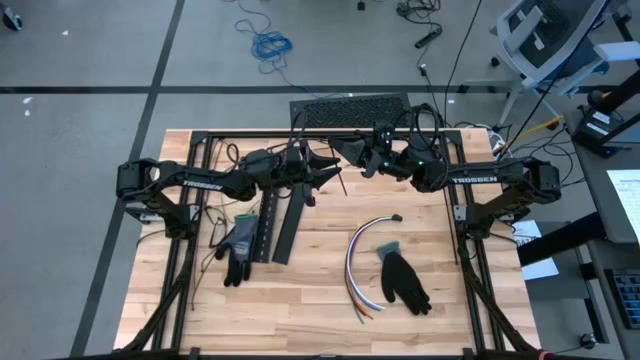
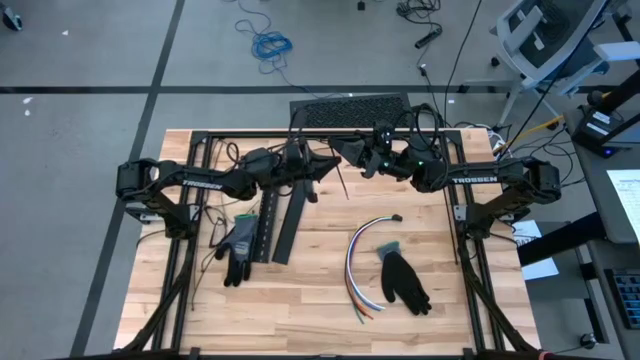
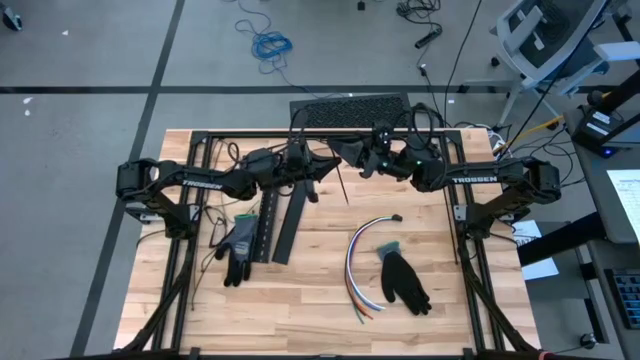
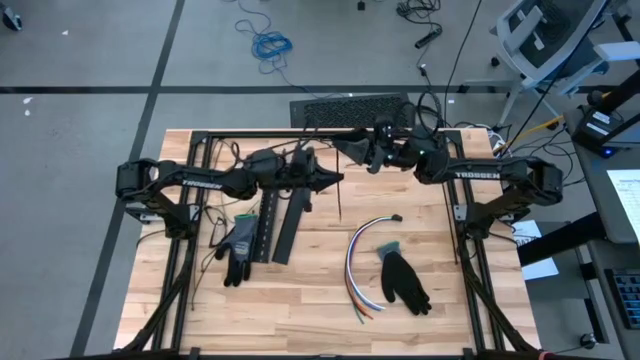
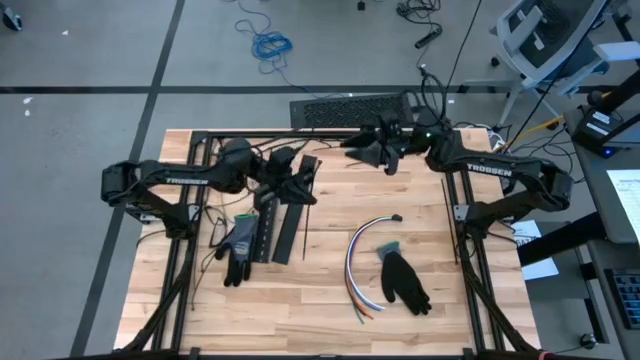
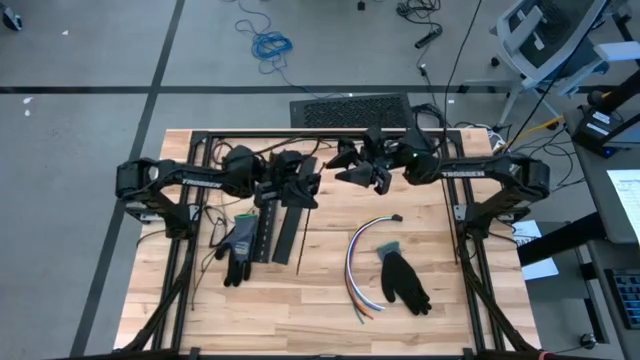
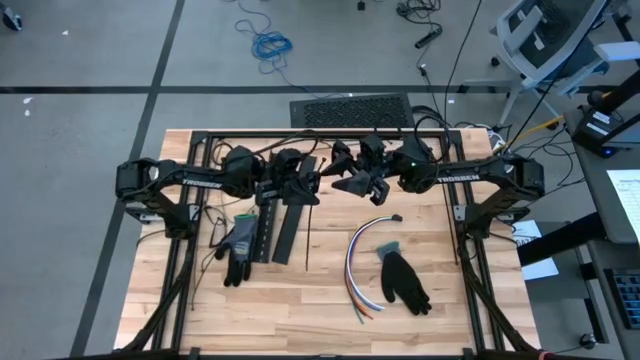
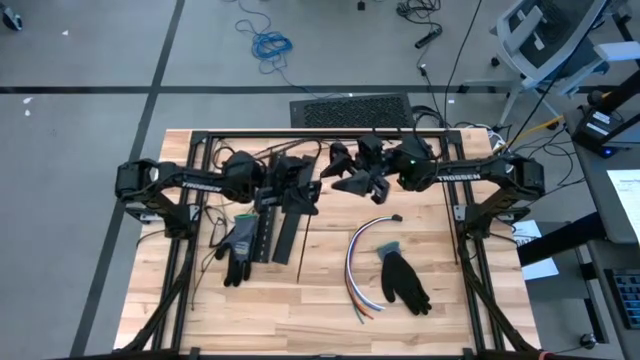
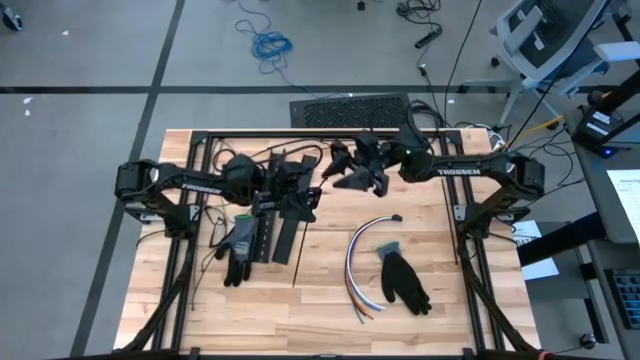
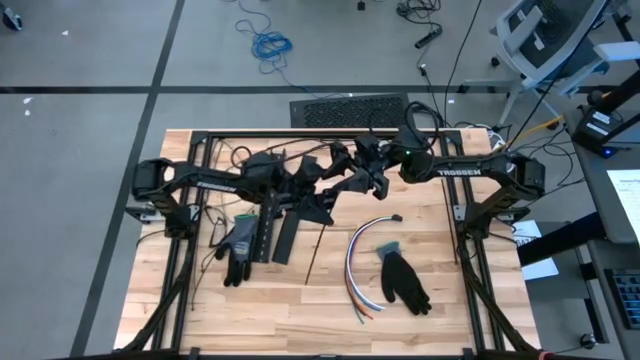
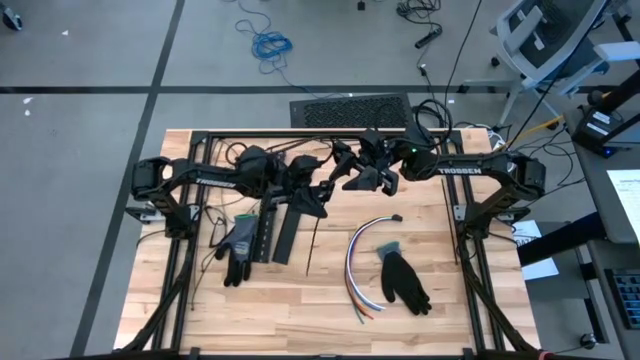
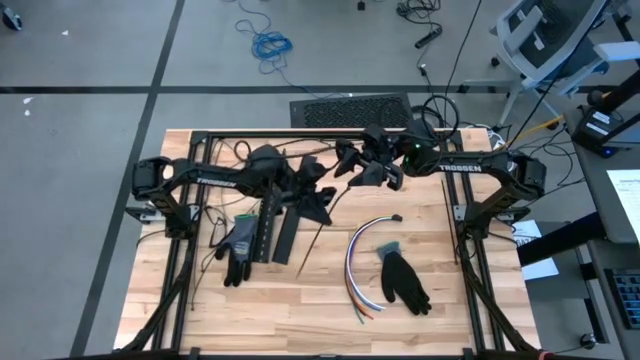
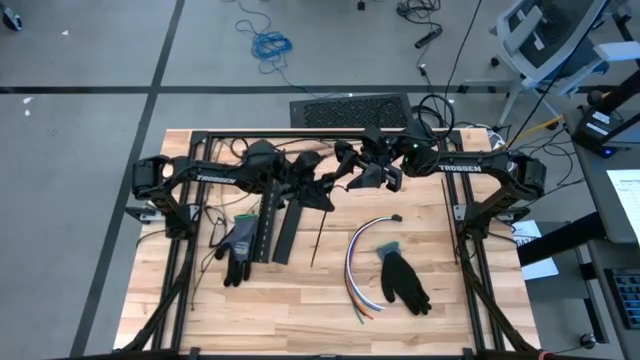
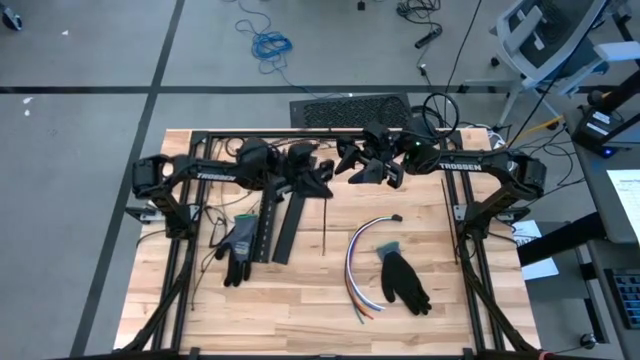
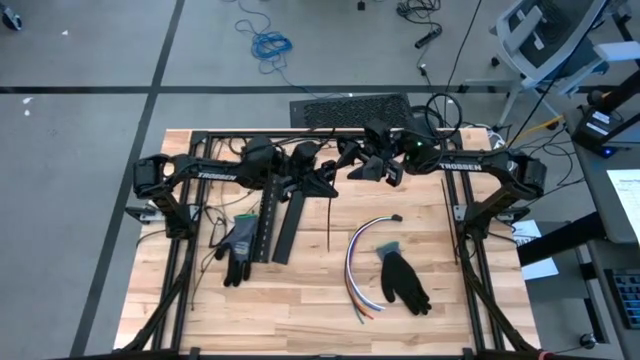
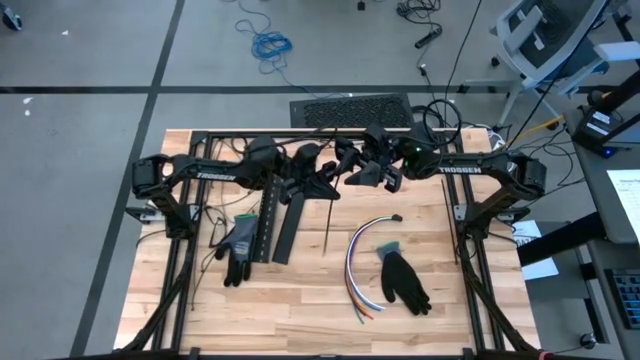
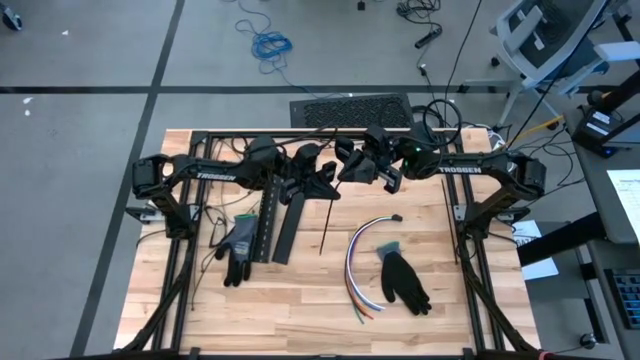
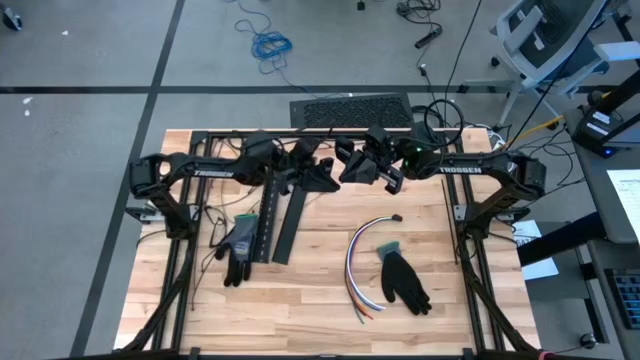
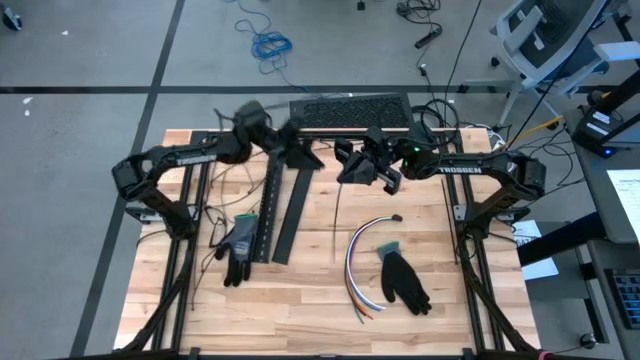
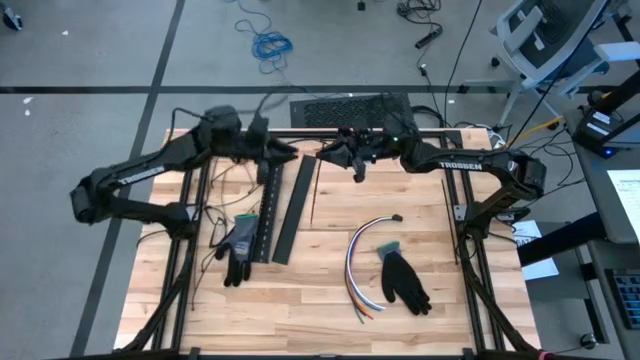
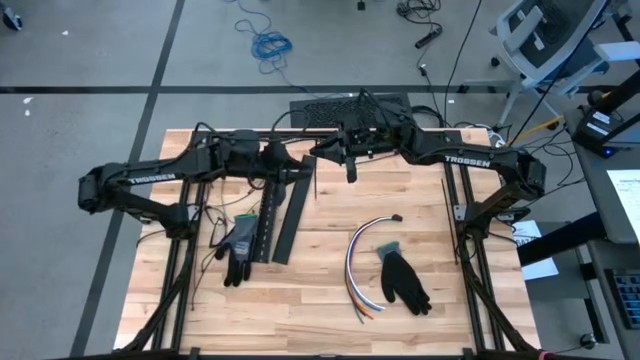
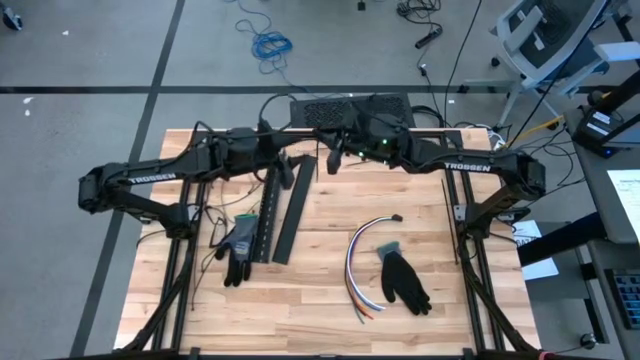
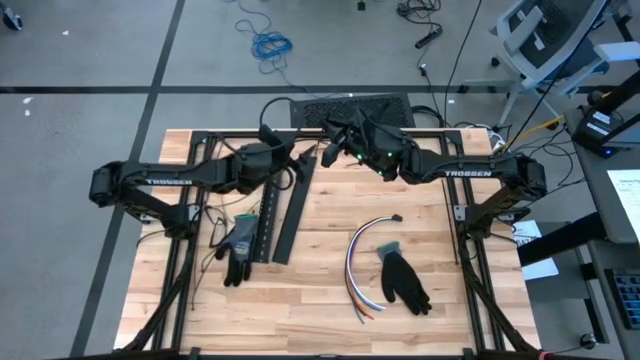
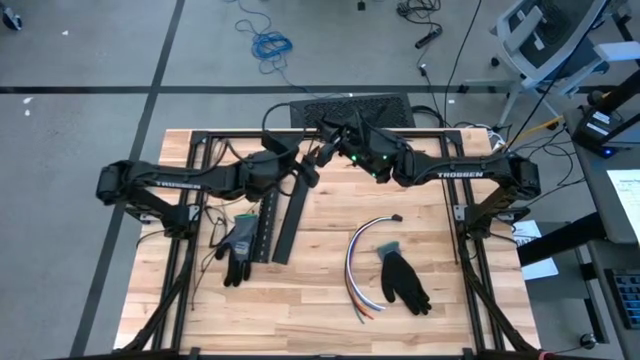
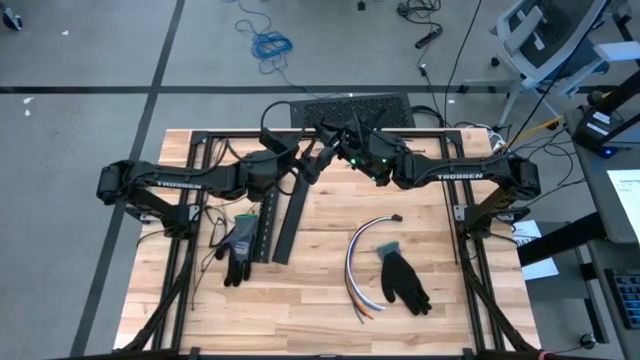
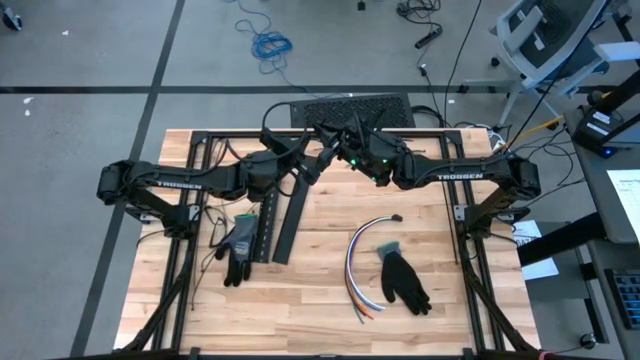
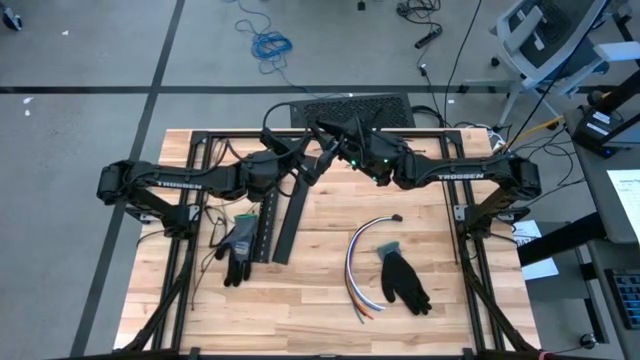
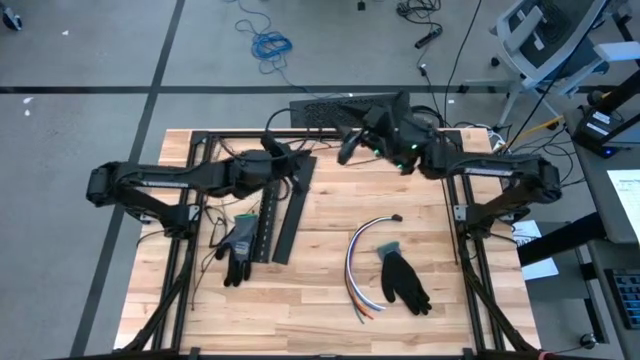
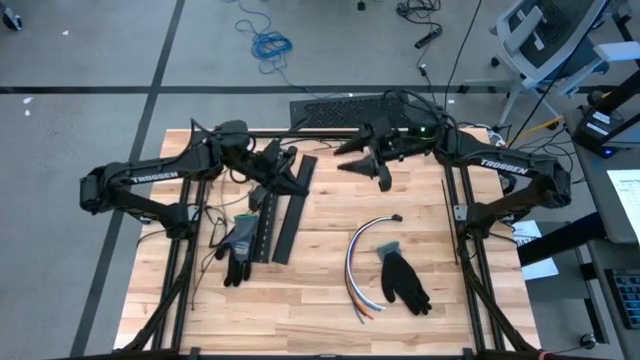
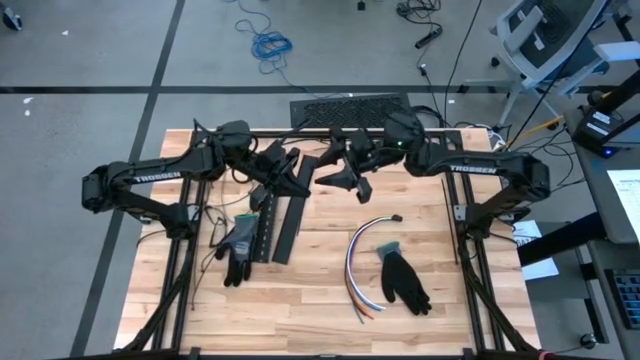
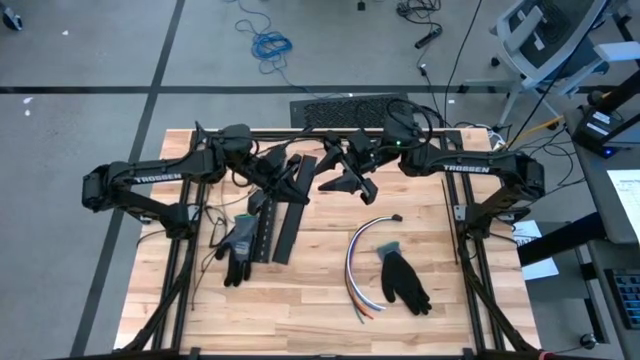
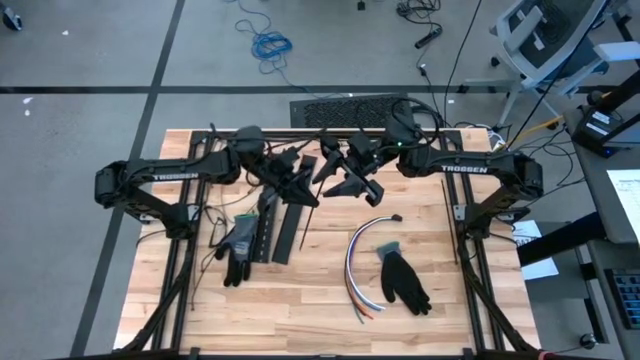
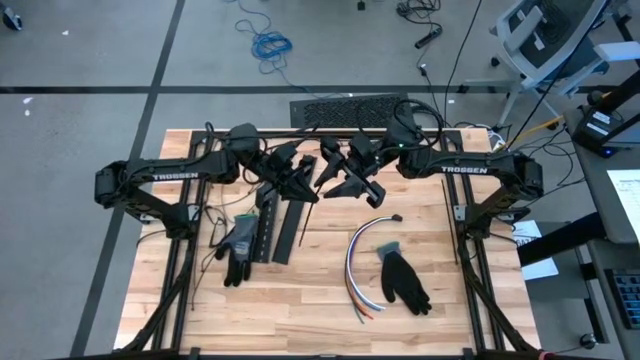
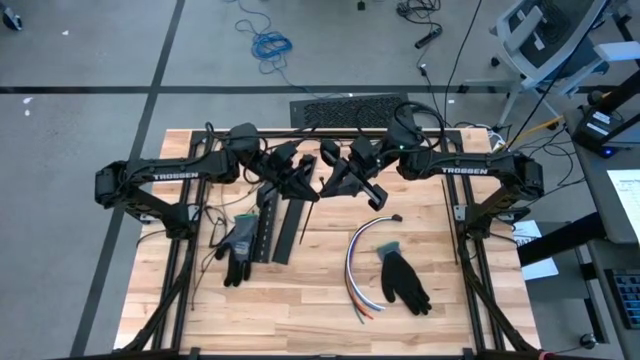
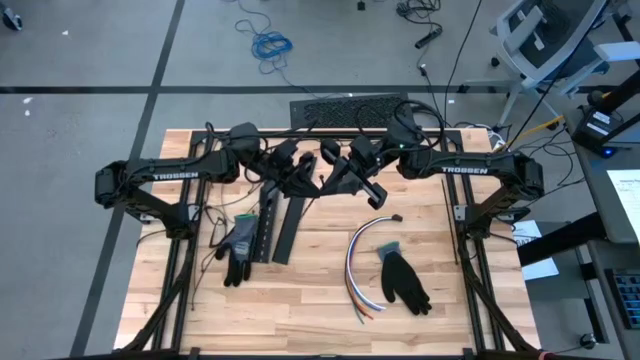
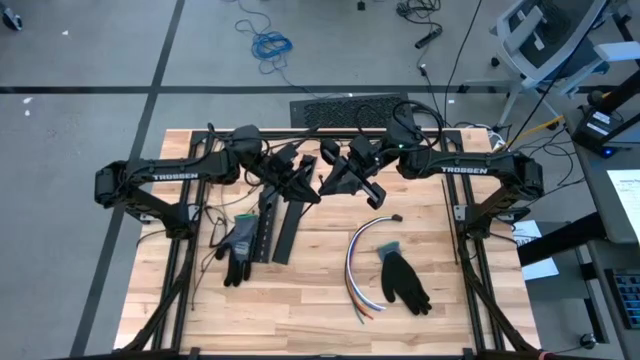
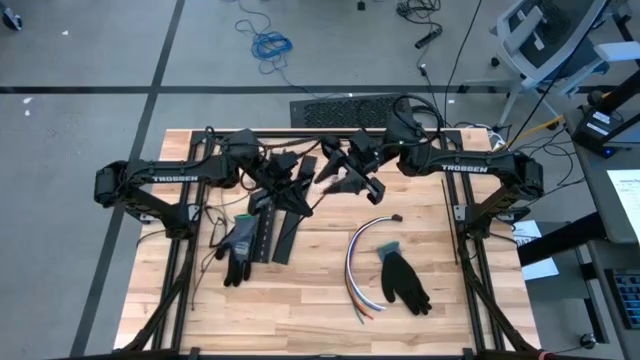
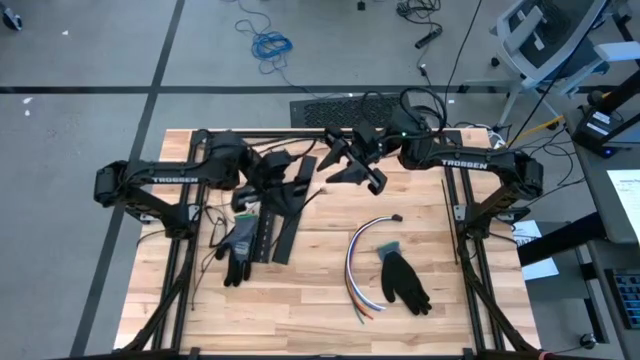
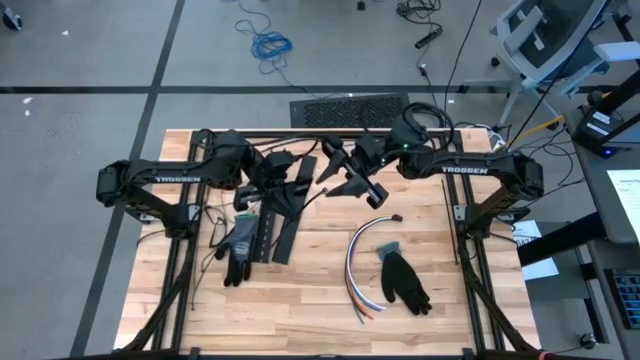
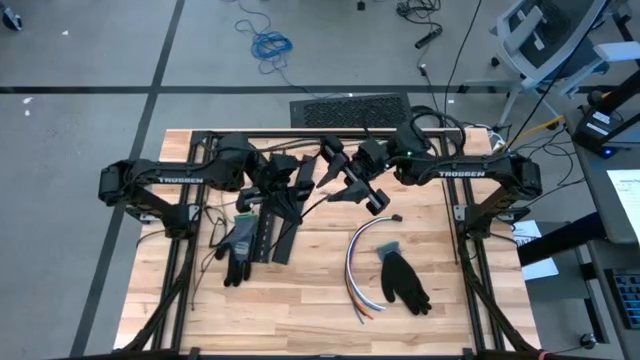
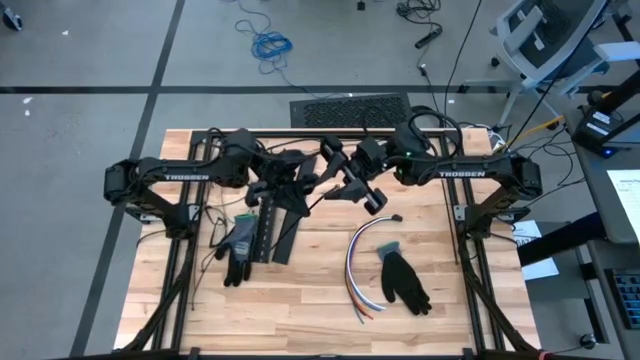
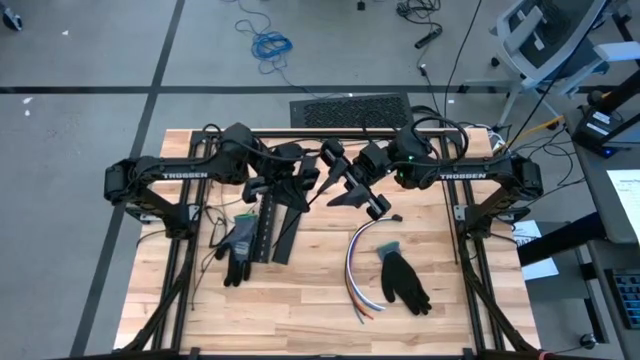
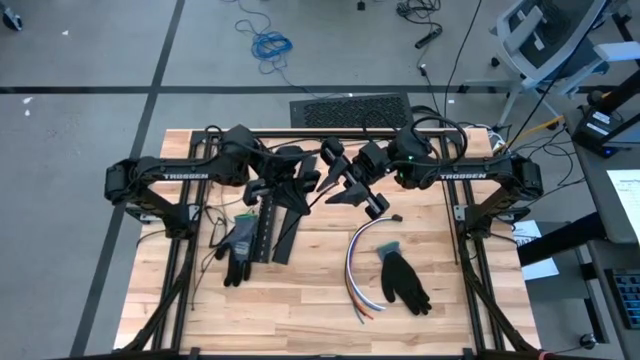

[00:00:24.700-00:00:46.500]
Task: Ziptie cables
Wrap the cable wires with the black ziptie
